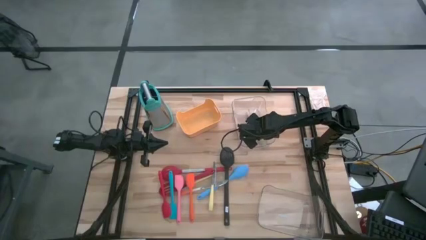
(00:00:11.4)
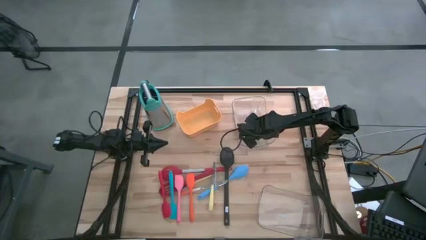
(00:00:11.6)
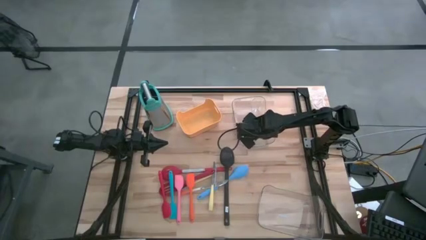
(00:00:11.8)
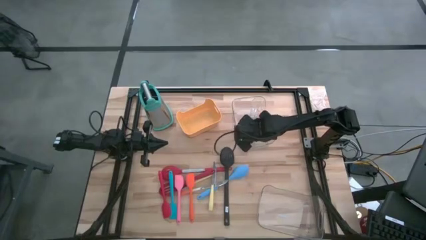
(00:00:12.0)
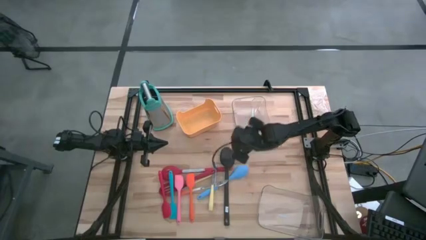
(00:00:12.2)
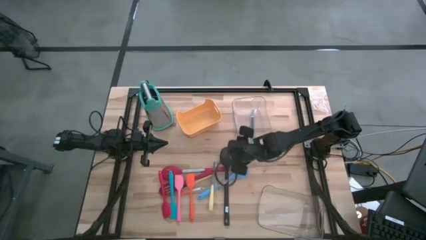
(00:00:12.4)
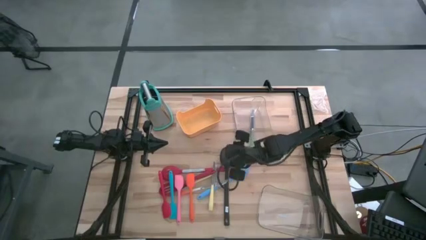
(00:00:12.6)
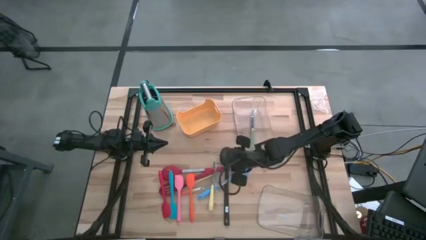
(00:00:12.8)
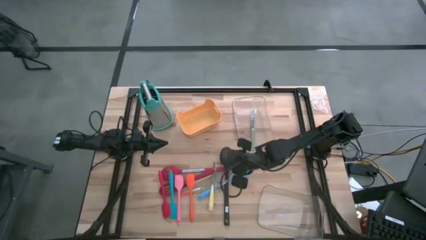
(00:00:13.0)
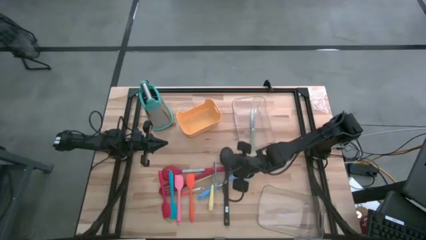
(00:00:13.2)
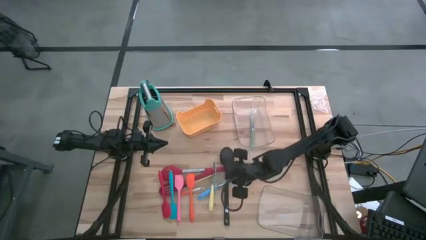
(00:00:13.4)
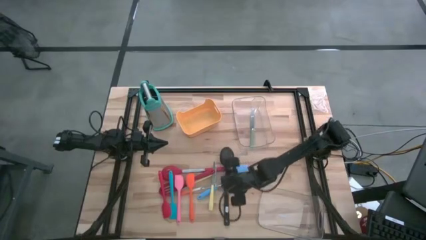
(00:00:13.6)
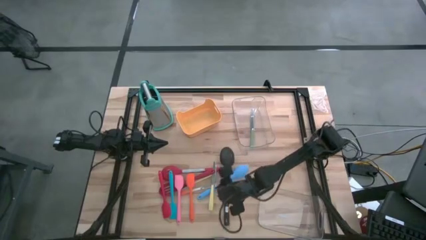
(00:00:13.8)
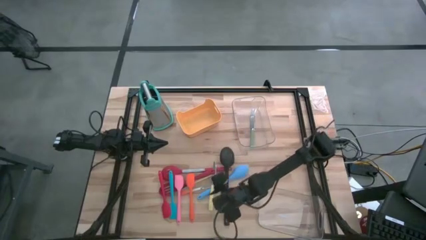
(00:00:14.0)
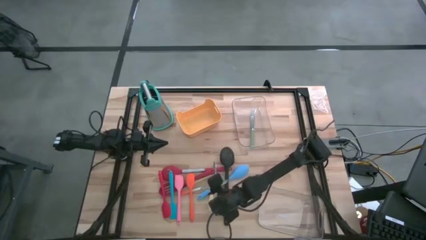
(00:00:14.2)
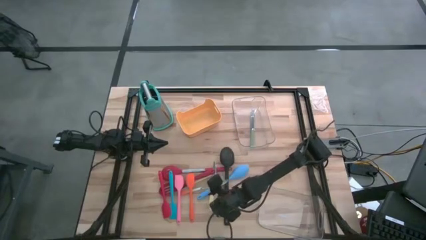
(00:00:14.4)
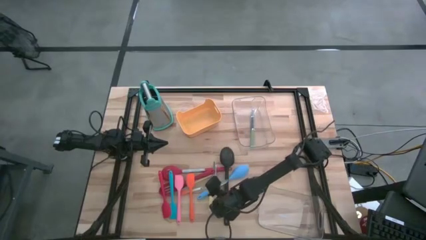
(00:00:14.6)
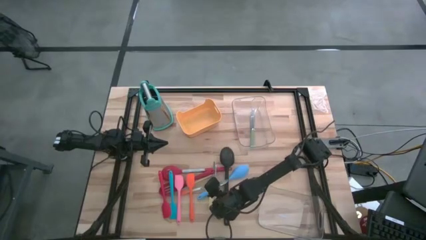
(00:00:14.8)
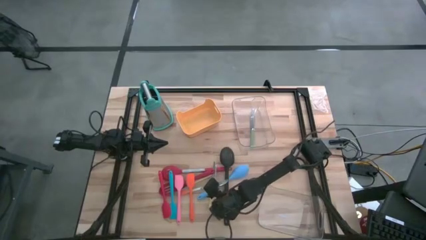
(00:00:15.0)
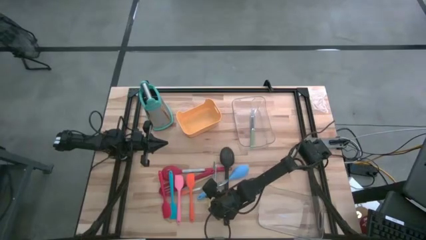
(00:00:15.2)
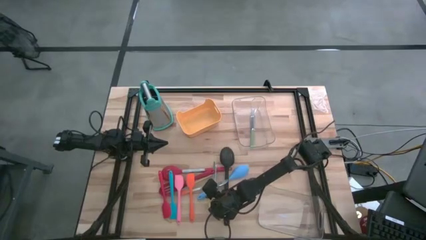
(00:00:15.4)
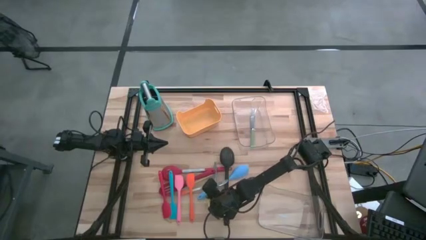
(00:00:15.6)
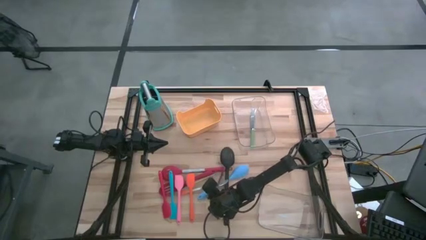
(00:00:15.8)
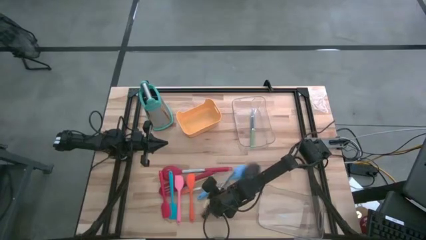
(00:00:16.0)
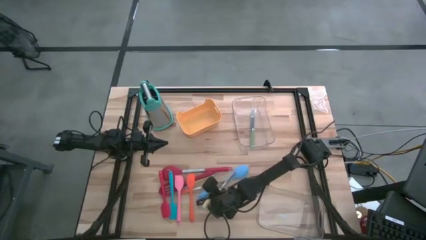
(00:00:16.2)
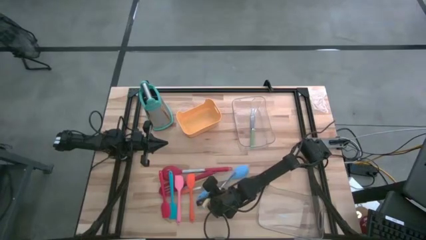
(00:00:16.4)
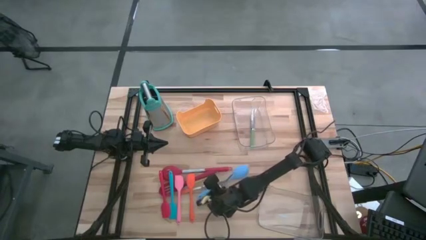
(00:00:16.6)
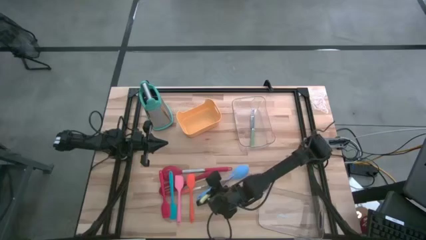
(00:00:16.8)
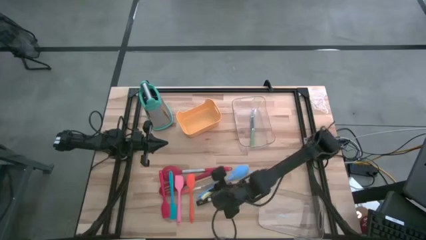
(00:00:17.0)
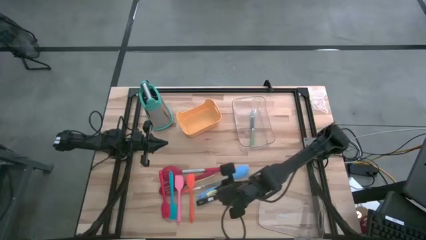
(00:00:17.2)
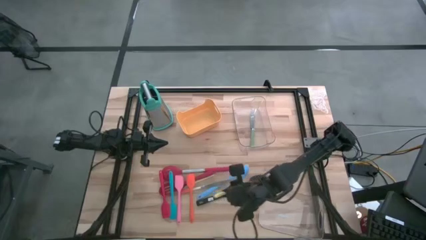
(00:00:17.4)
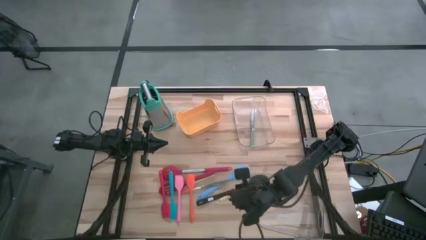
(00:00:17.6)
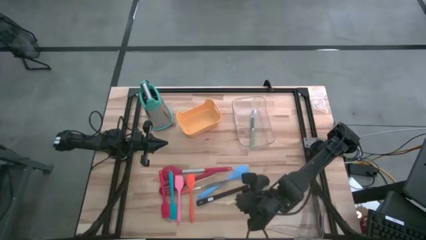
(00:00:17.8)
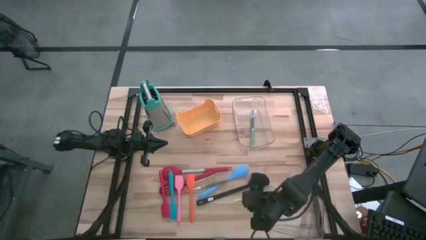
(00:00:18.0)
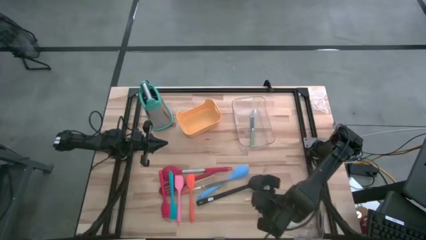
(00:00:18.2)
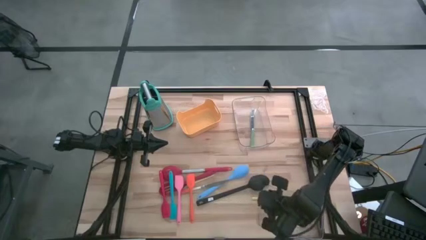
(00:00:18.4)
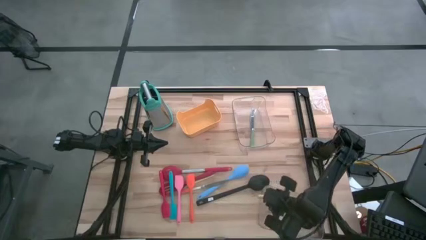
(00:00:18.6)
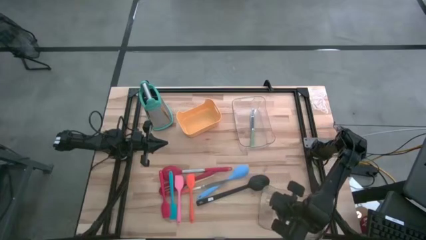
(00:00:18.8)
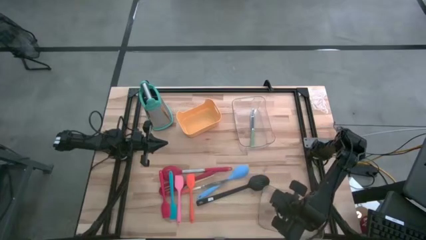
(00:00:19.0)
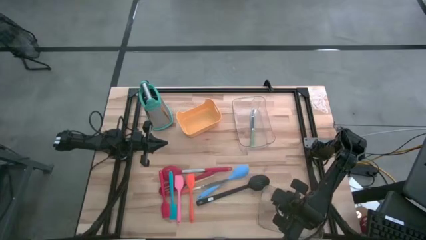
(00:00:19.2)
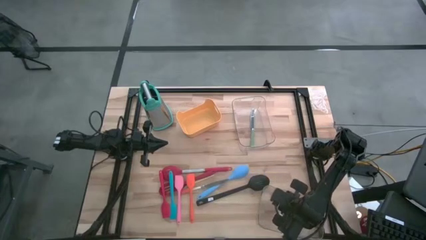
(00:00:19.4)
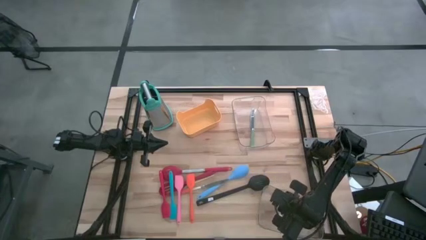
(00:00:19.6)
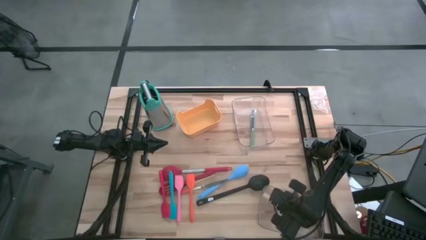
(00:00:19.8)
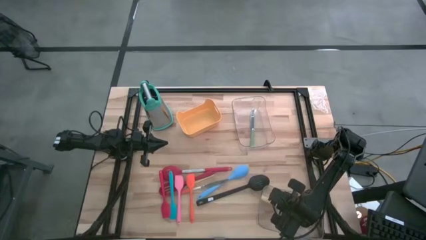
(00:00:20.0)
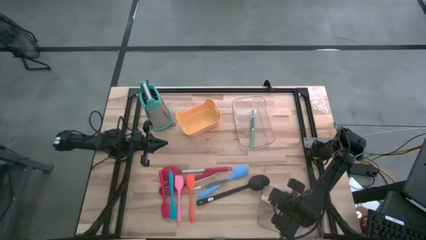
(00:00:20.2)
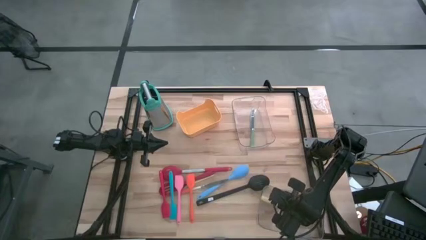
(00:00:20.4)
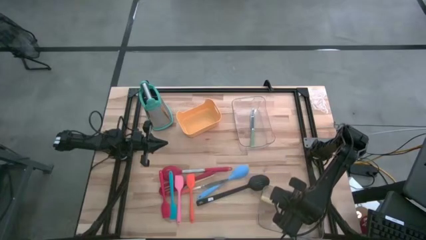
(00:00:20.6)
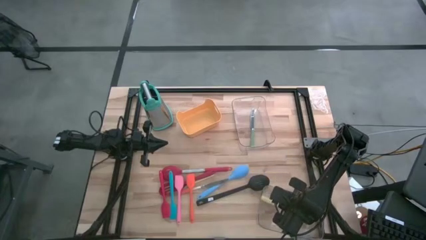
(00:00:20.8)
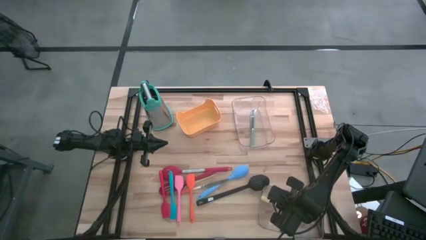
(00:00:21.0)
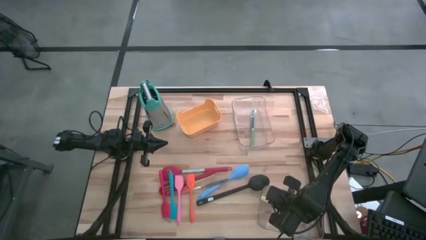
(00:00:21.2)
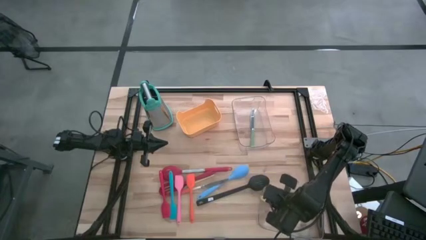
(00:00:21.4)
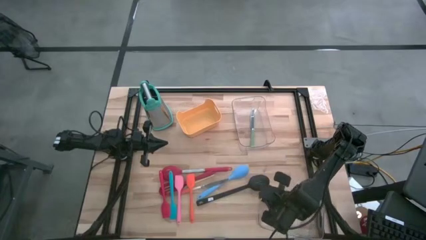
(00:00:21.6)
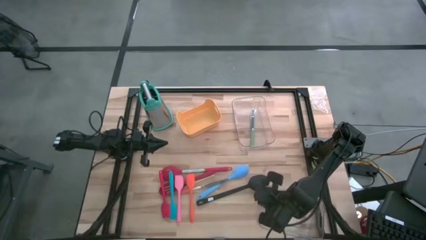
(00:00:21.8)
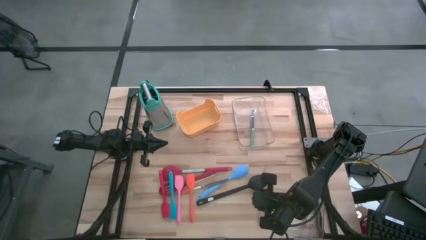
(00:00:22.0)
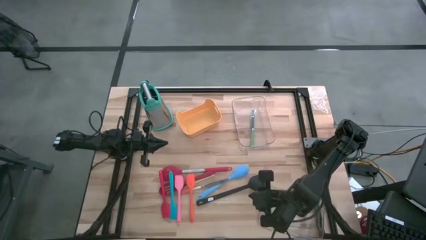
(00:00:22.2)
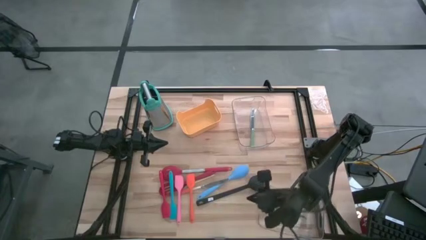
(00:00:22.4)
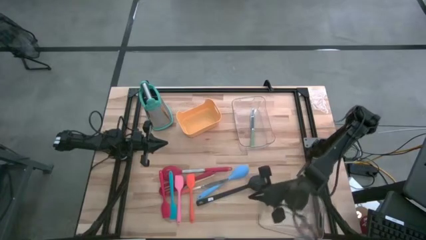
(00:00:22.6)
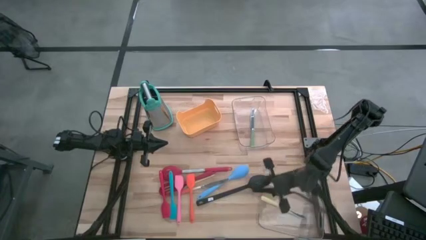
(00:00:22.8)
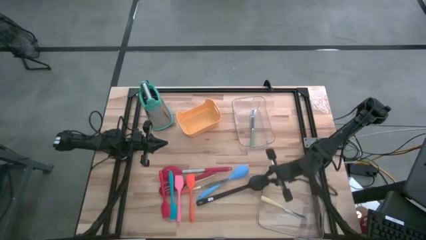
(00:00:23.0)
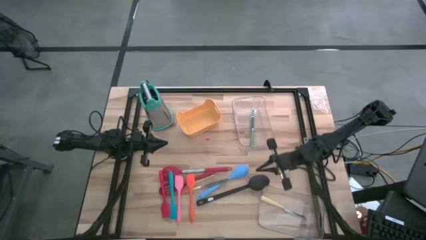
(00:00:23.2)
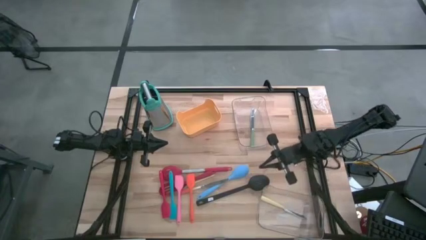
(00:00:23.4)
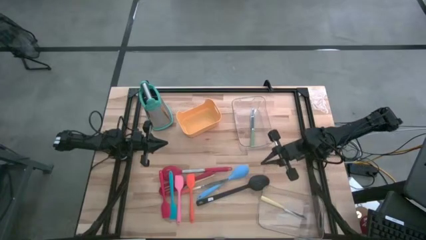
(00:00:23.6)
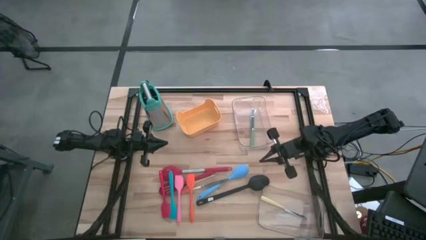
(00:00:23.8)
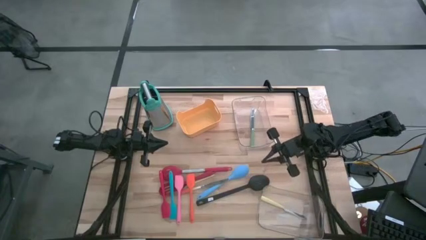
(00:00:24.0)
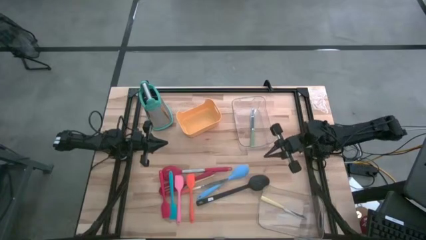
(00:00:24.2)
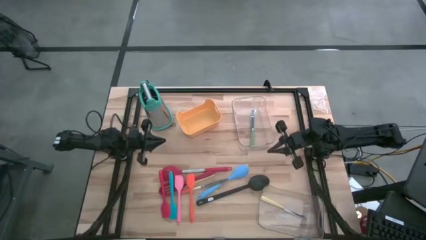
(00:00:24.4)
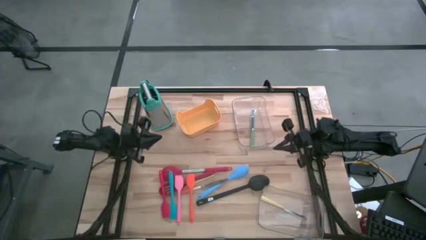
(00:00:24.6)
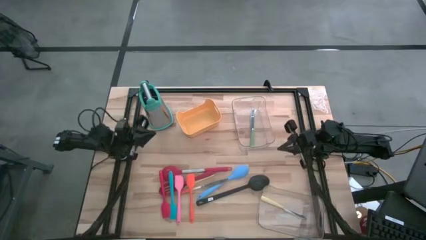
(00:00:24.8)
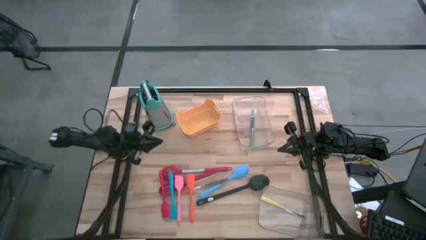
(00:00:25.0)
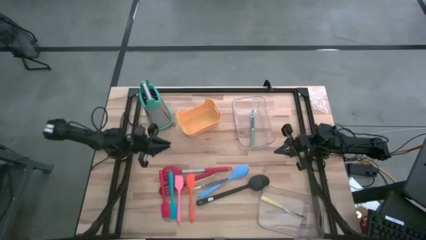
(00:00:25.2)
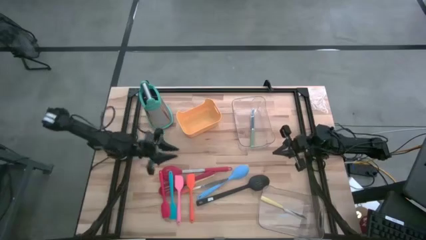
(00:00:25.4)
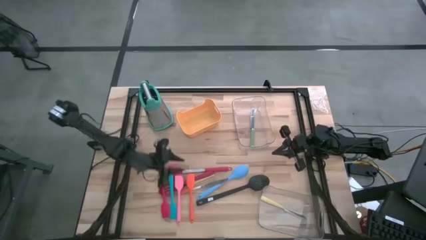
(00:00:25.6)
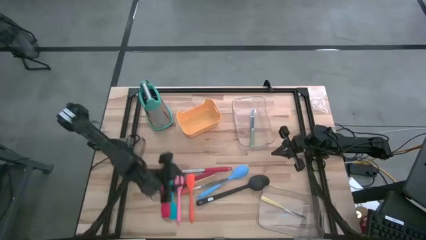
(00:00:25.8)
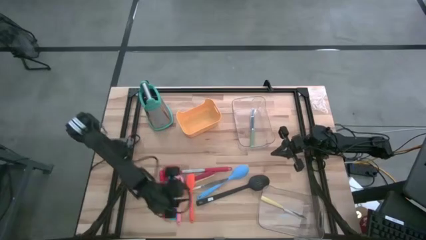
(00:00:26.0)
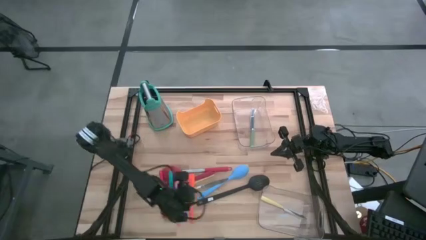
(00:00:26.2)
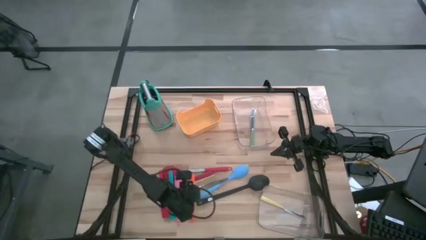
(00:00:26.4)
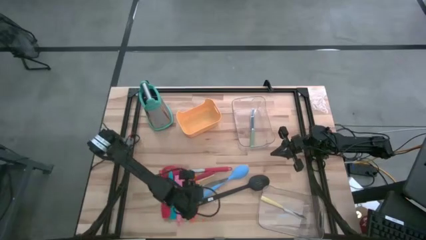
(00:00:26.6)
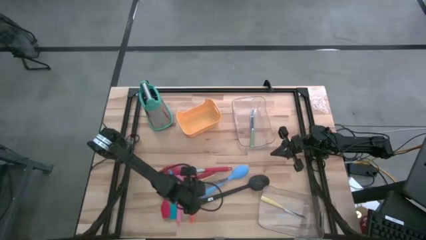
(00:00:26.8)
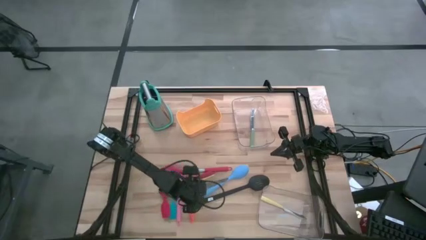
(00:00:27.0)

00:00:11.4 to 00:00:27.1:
Task: Pick & Place Kitchen Items
Put the right yellow kitchen knife into the top transparent bin
